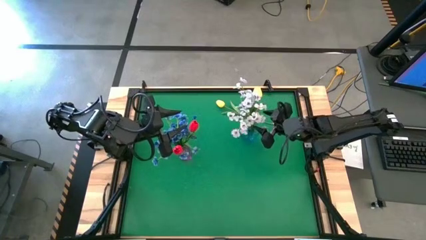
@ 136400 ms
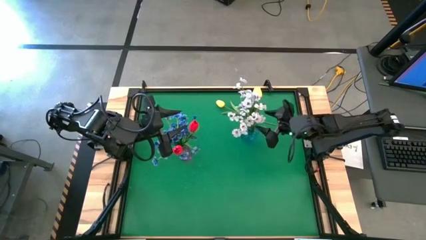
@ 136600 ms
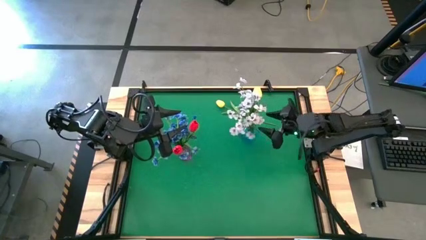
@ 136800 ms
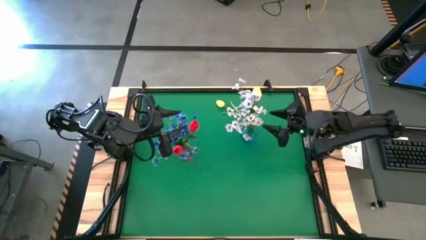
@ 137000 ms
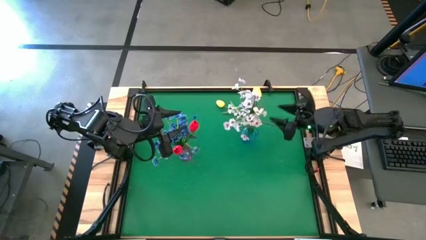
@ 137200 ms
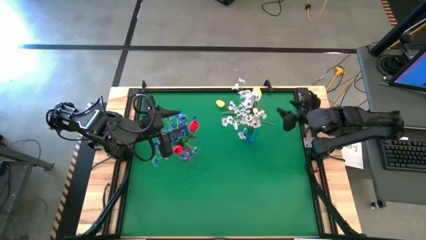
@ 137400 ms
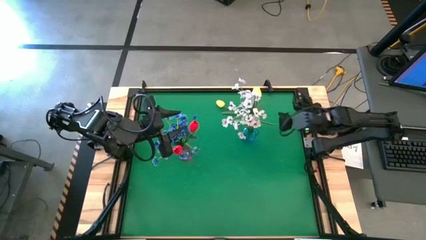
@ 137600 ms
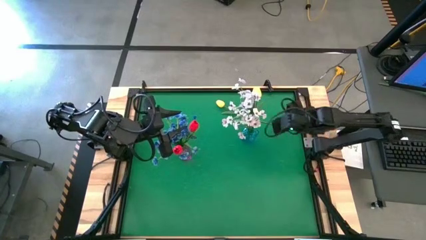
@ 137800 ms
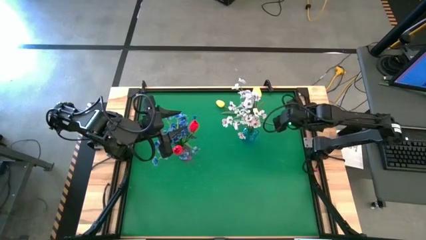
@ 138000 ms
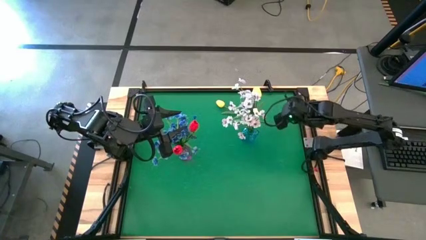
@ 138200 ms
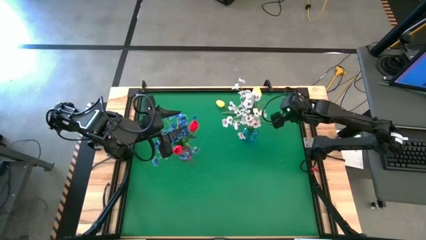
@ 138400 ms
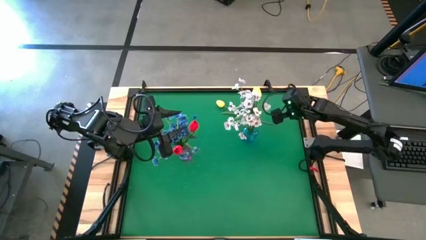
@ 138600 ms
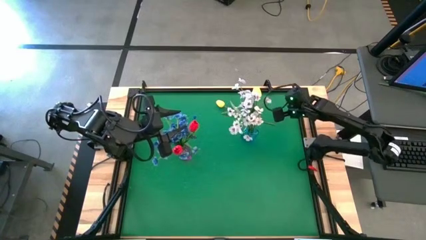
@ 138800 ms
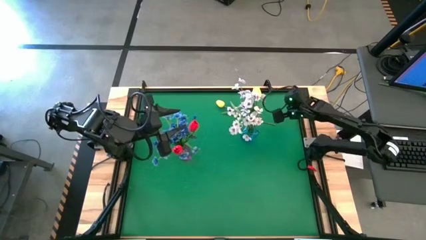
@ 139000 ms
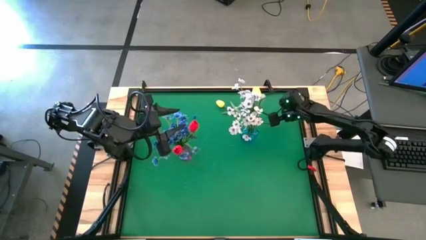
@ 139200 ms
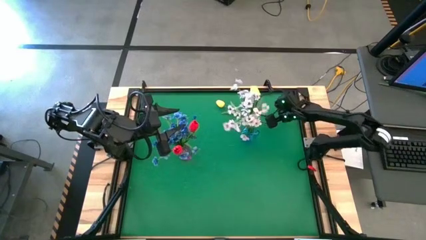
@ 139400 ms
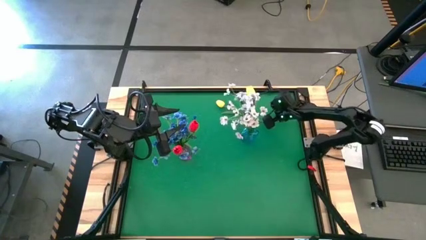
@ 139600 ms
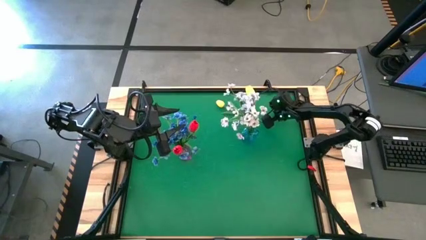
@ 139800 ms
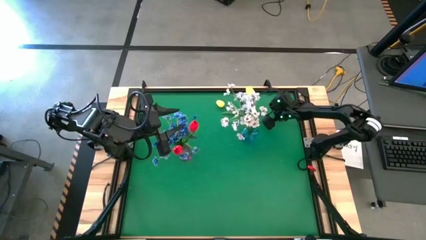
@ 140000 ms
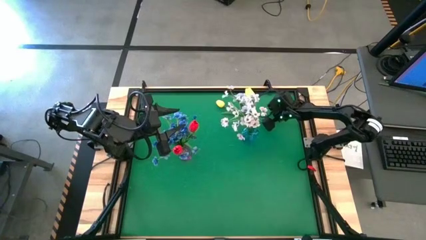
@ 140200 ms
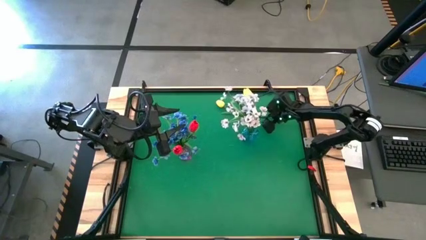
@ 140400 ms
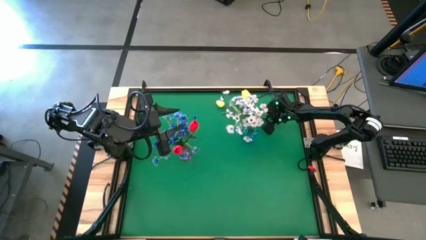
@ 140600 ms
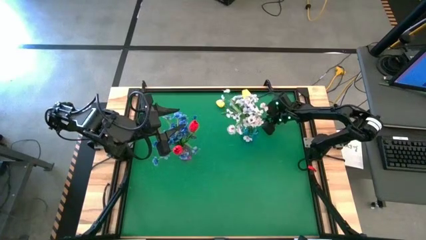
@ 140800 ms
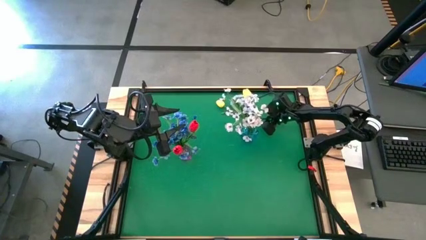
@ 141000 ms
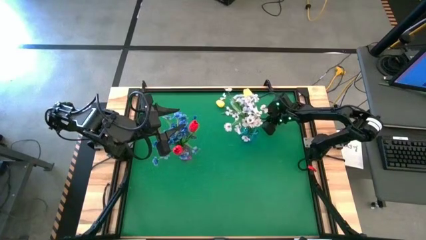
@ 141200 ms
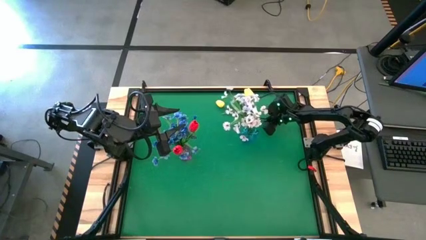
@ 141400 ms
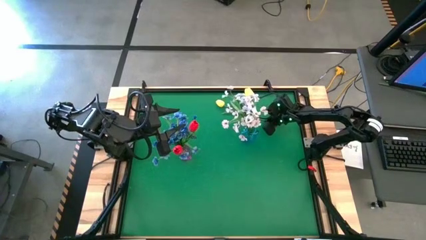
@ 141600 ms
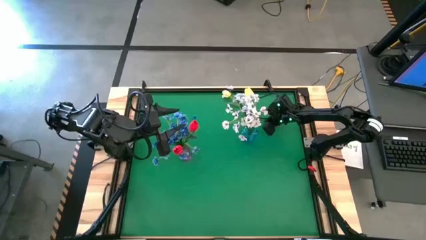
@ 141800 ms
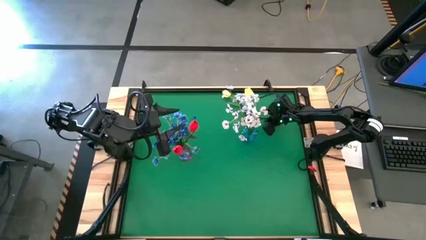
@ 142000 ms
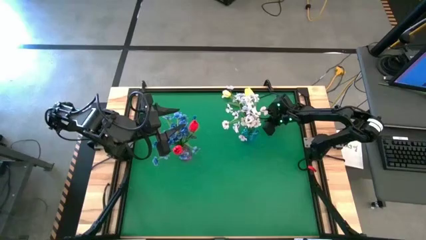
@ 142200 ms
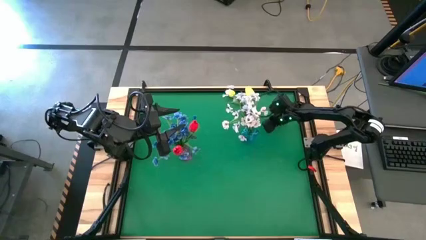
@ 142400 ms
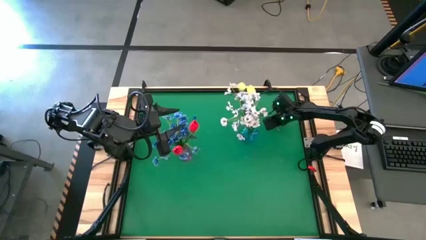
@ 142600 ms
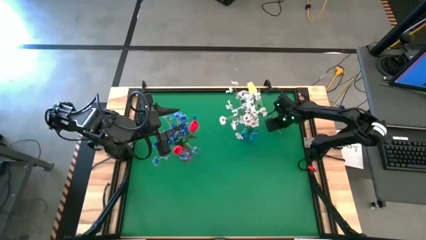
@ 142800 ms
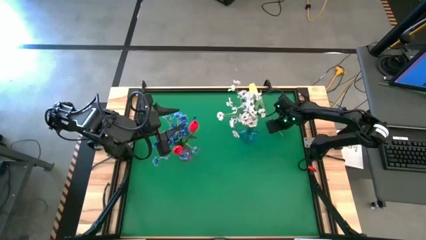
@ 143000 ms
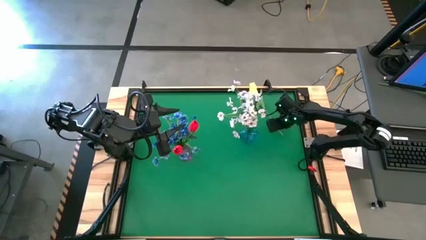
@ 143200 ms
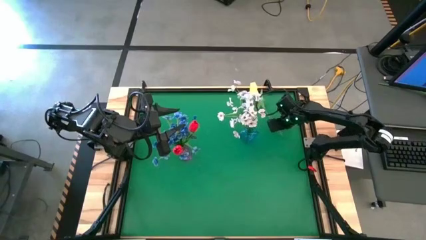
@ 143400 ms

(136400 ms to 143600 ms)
Task: Sort flowers into vase by color
Put the yellow tulip into the blue vase
